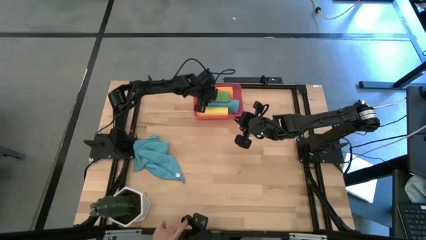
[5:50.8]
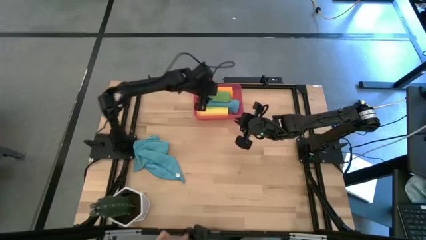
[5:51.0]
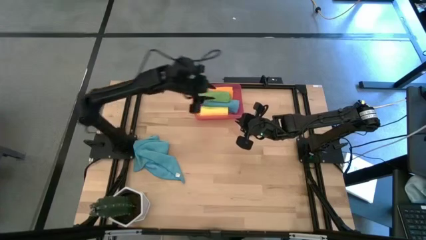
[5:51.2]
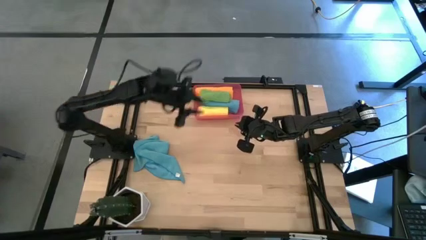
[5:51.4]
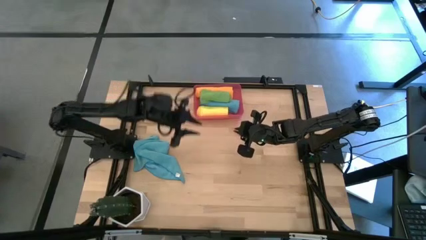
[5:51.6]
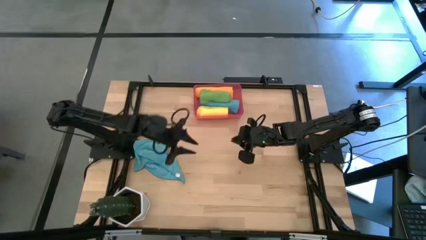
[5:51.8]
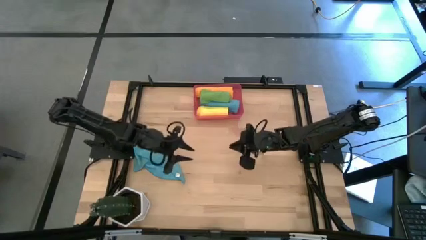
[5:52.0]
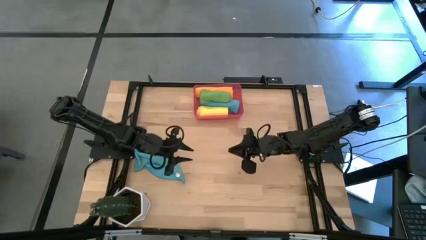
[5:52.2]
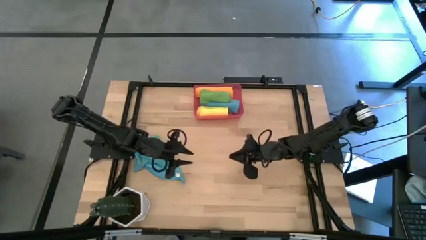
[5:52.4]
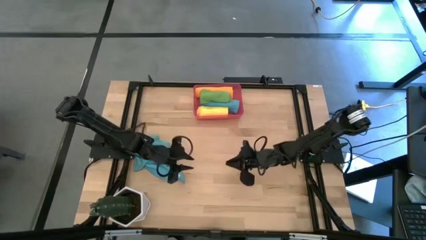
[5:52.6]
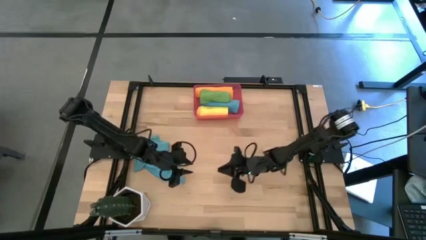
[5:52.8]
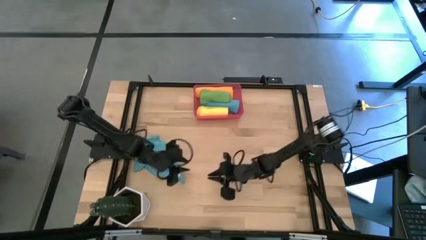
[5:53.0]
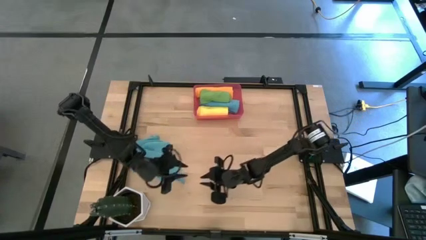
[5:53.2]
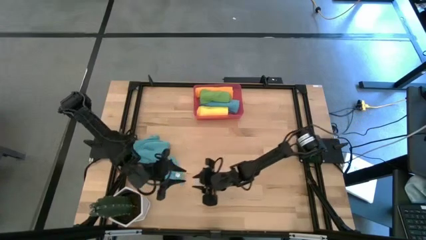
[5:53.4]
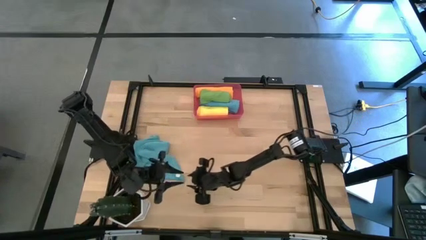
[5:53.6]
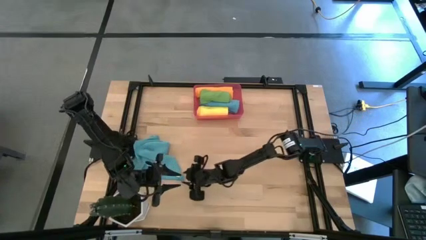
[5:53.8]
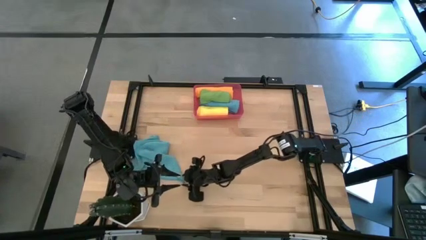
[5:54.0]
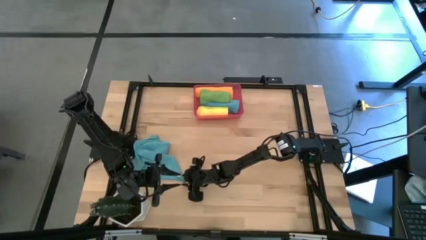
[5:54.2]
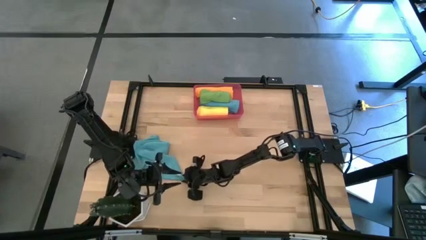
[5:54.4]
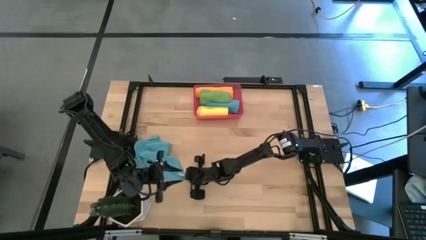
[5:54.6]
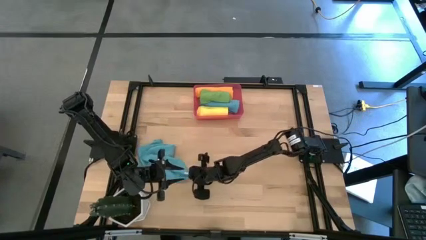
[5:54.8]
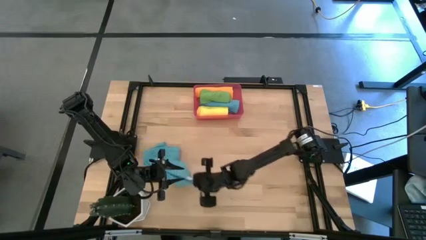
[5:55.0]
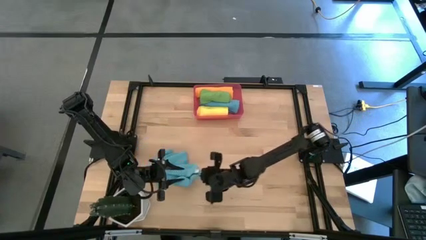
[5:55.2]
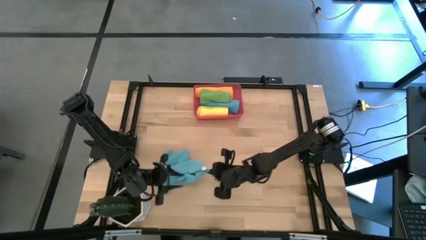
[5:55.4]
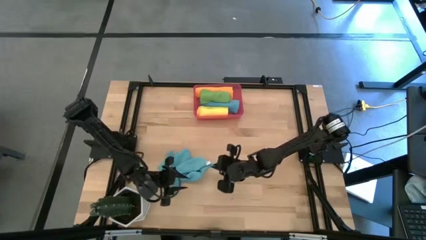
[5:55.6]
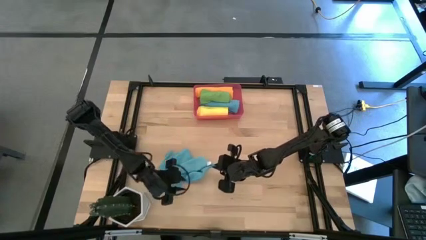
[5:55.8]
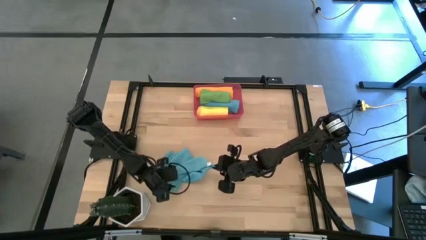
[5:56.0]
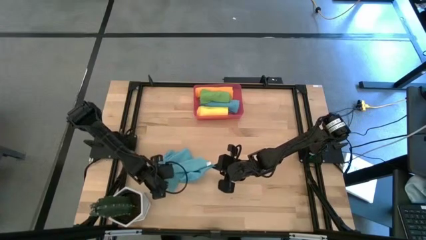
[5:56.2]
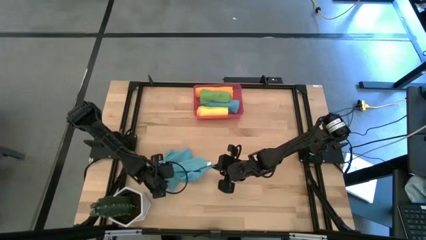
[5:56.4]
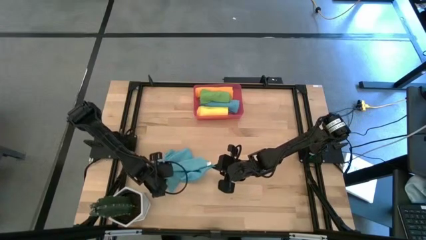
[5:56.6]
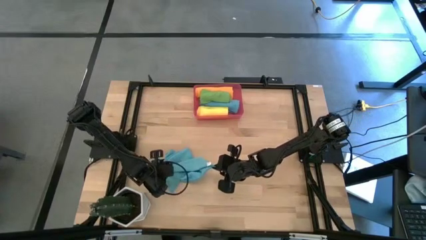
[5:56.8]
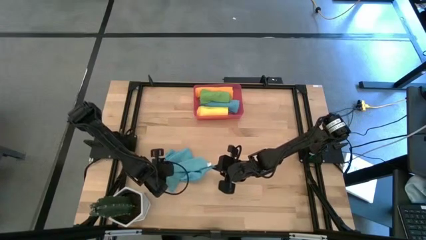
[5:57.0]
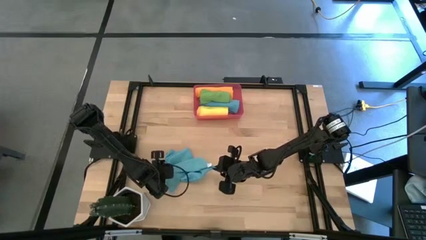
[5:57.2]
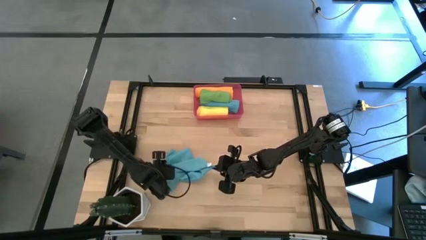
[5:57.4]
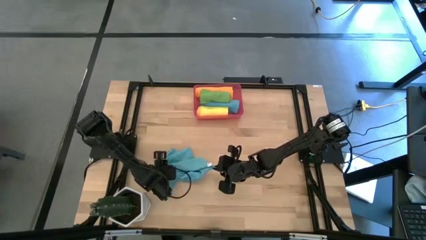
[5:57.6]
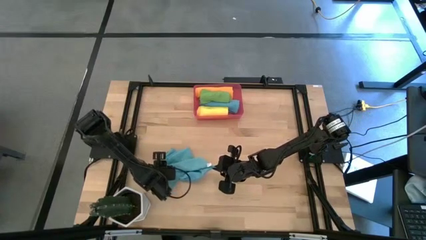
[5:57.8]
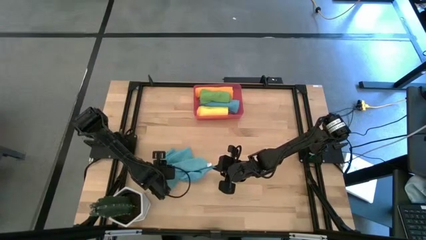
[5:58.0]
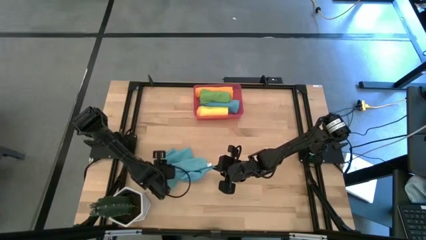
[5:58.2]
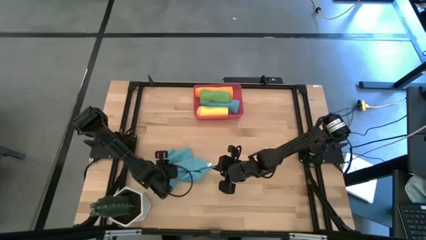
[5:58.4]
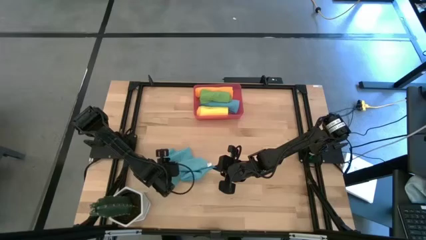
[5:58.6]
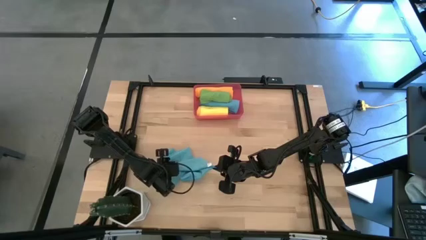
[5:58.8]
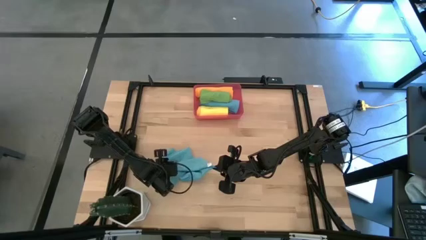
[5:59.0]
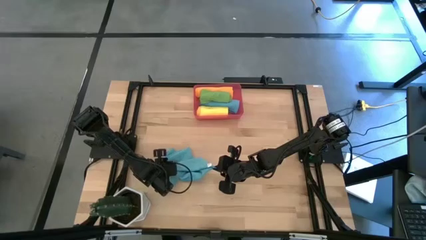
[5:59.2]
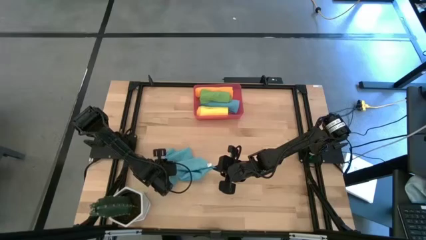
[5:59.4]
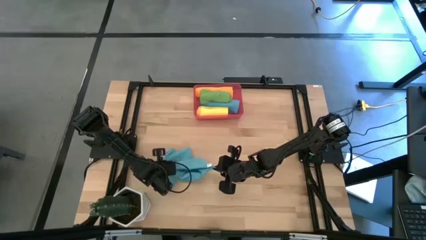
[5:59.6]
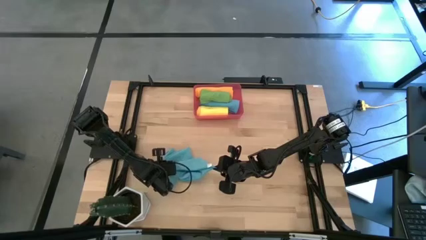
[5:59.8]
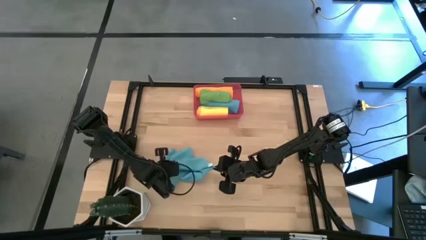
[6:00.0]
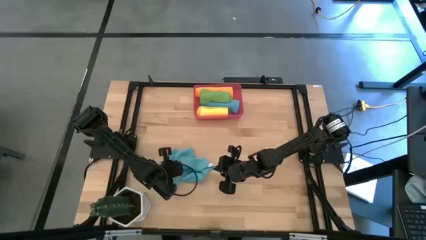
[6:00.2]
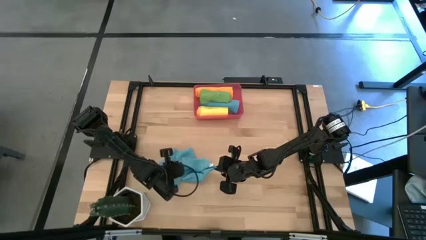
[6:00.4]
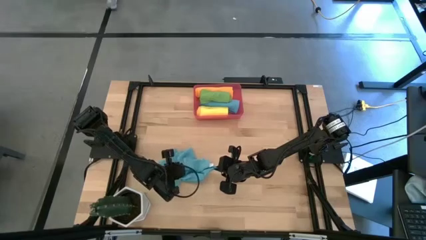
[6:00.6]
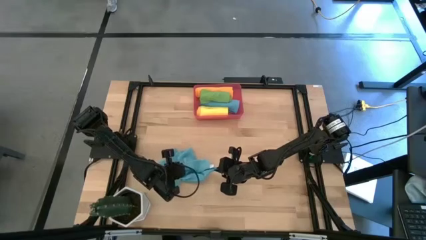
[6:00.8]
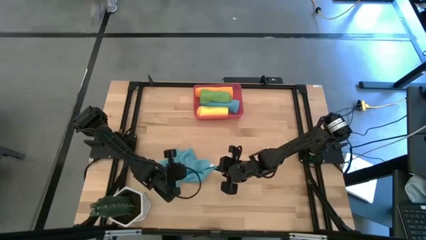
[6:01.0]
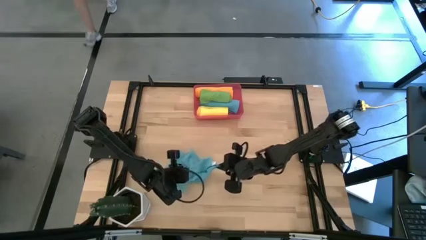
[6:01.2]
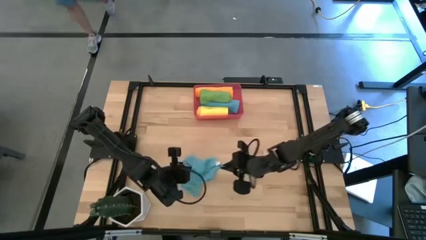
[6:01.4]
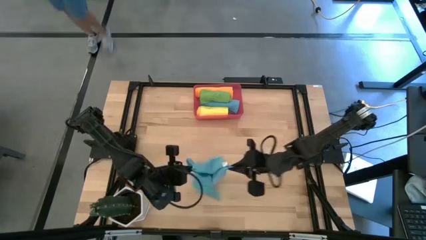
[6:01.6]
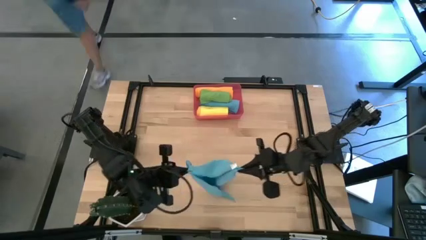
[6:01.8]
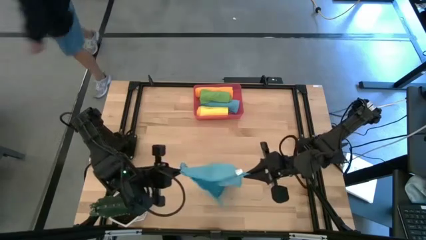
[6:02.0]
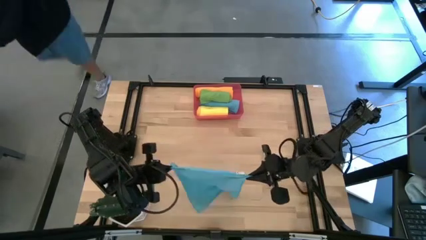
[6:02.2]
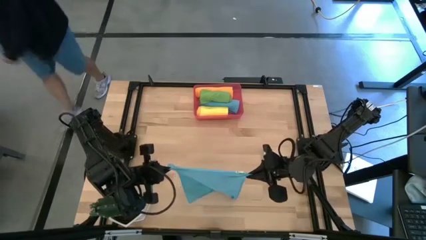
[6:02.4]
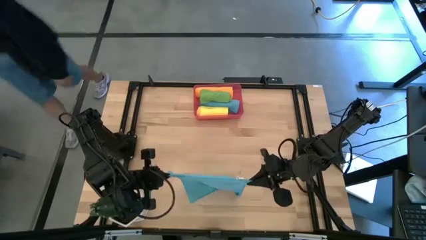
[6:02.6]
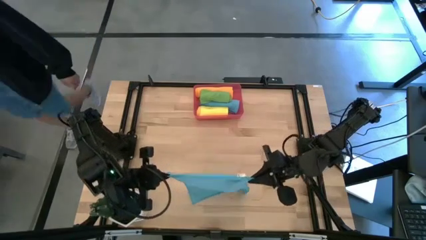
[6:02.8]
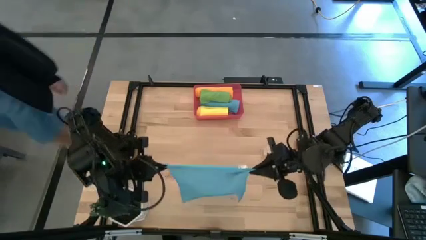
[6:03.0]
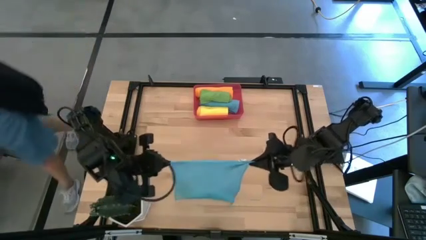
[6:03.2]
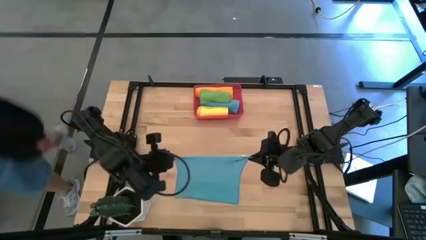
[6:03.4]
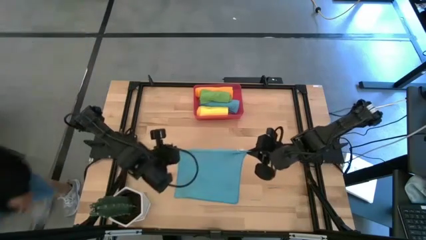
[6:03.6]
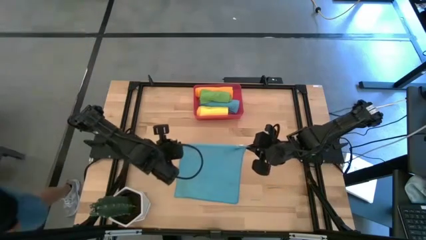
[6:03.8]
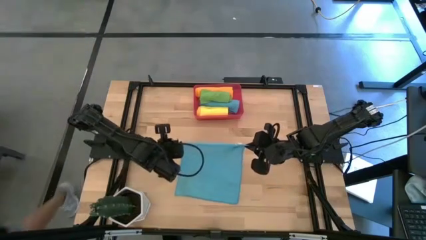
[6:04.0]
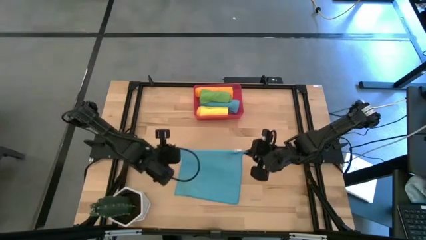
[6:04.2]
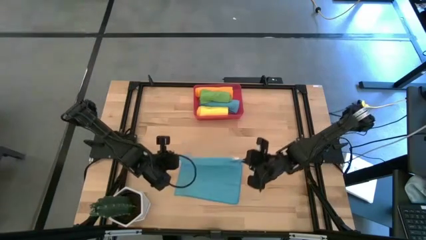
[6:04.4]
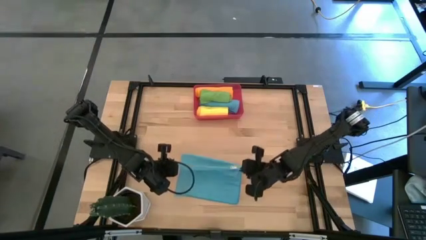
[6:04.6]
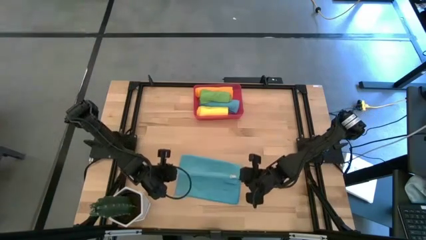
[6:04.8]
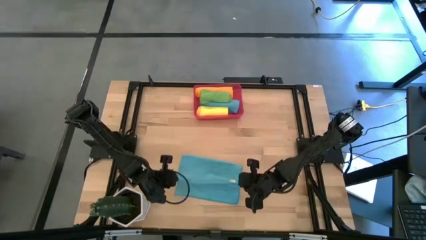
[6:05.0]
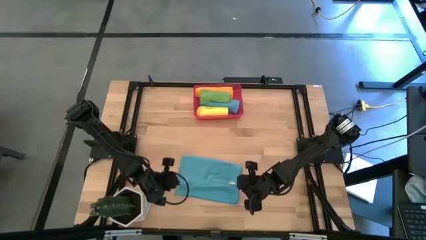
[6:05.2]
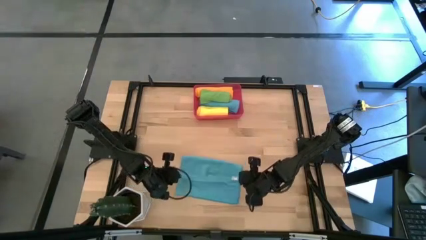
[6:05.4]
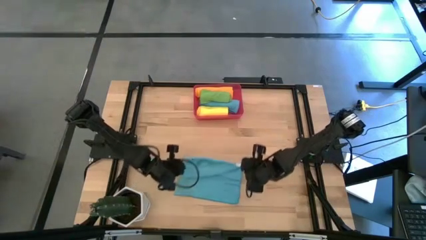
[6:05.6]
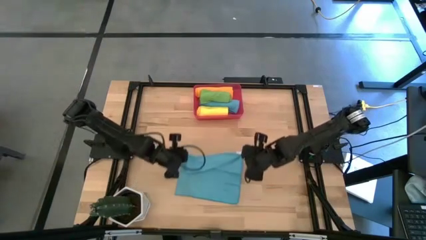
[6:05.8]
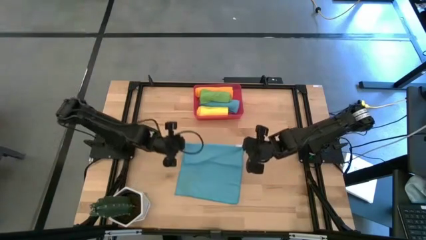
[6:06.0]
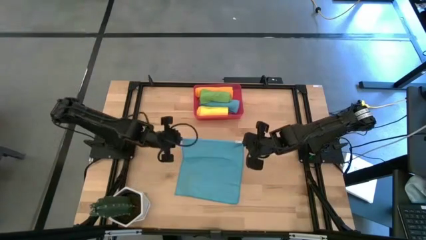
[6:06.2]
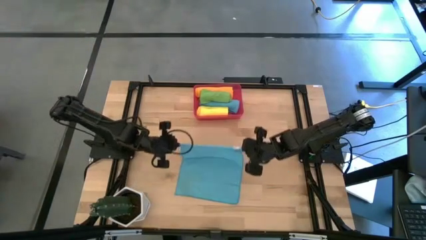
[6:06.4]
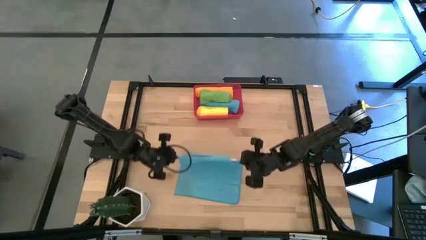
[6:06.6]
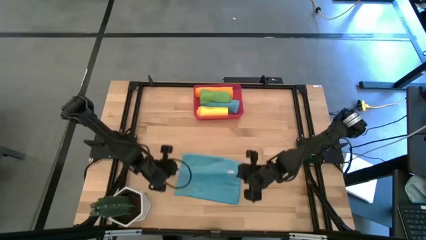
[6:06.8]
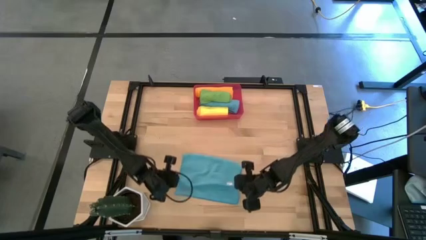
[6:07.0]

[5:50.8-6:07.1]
Task: Roll microfiber towels into tight, uniform cylinder then place into a basket
Roll the blue microfiber cloth
